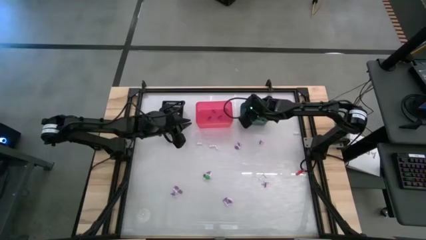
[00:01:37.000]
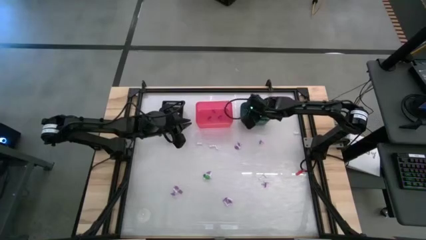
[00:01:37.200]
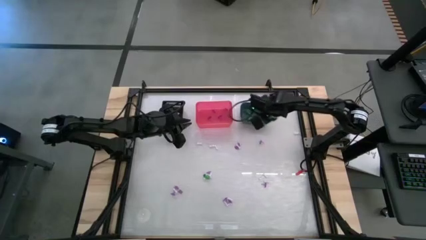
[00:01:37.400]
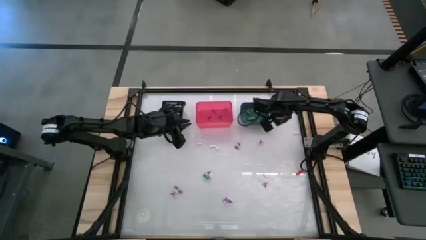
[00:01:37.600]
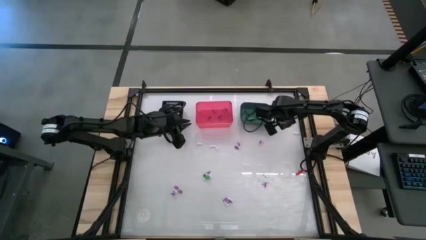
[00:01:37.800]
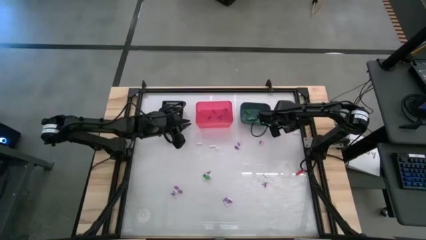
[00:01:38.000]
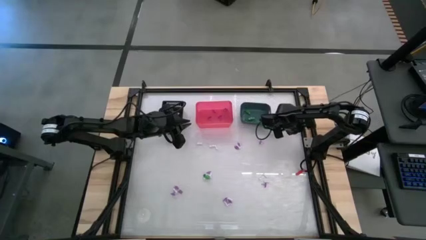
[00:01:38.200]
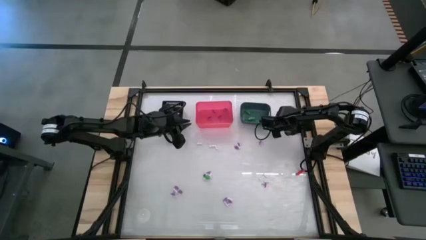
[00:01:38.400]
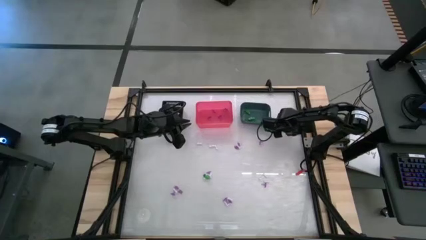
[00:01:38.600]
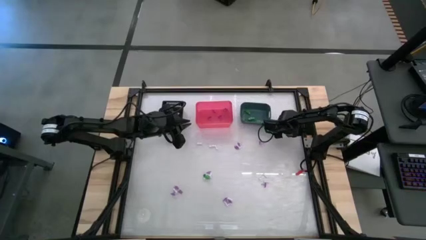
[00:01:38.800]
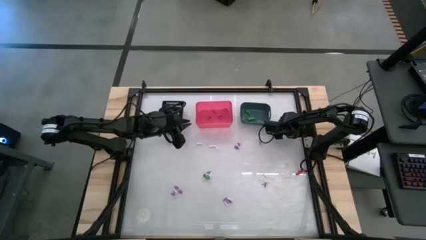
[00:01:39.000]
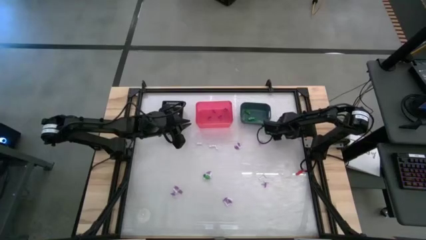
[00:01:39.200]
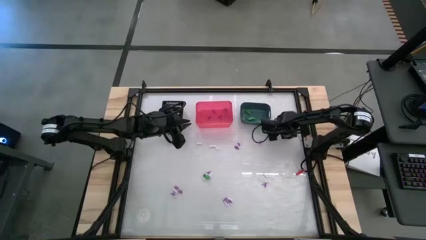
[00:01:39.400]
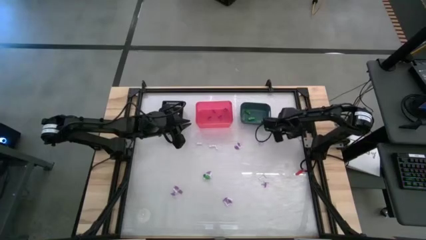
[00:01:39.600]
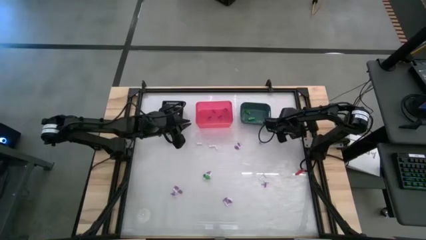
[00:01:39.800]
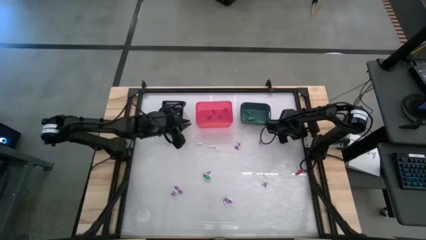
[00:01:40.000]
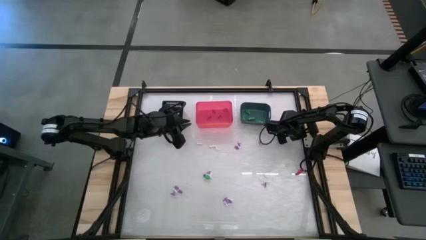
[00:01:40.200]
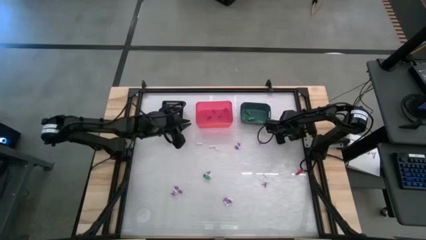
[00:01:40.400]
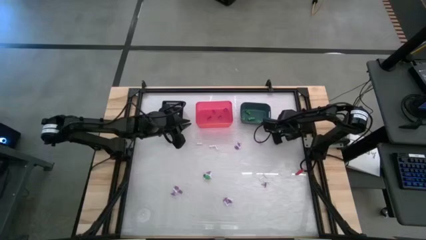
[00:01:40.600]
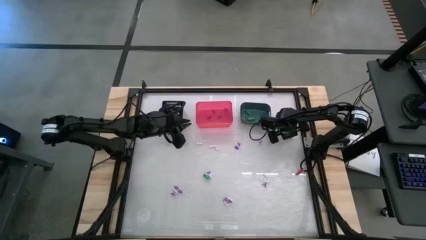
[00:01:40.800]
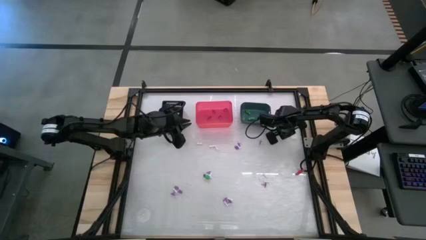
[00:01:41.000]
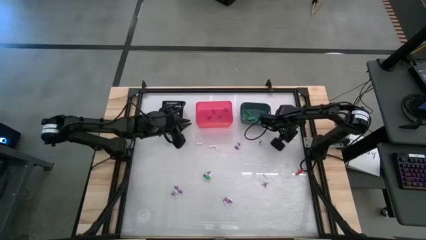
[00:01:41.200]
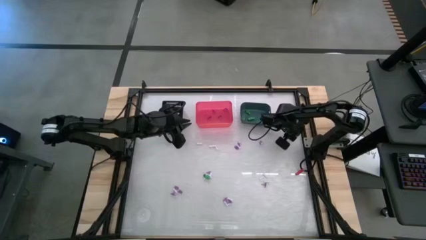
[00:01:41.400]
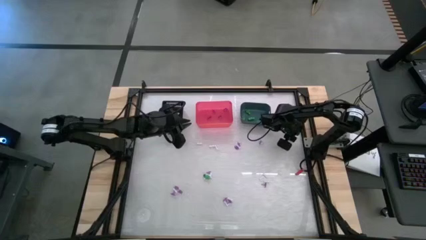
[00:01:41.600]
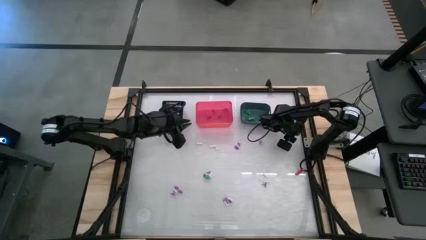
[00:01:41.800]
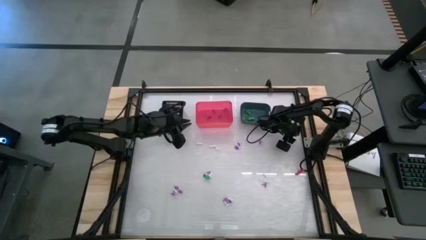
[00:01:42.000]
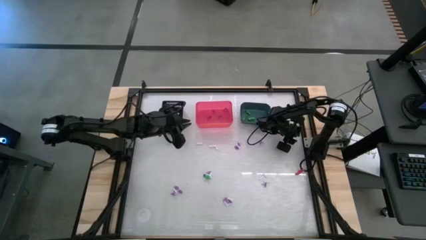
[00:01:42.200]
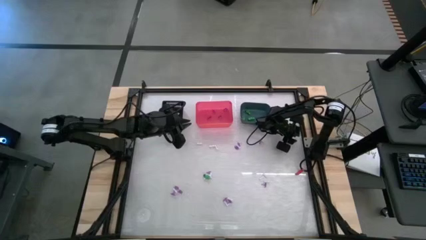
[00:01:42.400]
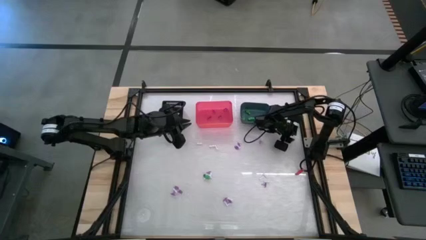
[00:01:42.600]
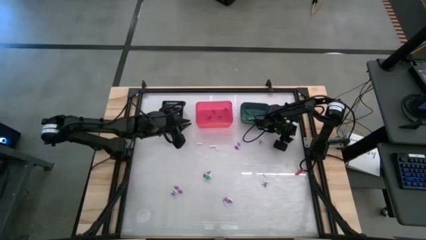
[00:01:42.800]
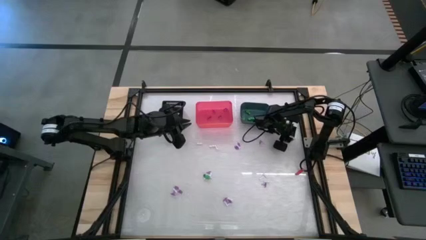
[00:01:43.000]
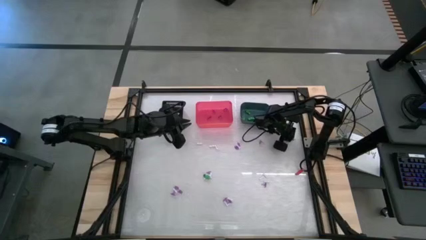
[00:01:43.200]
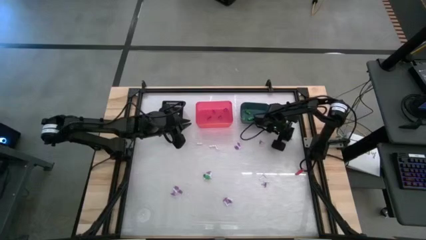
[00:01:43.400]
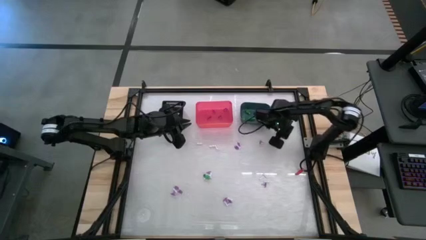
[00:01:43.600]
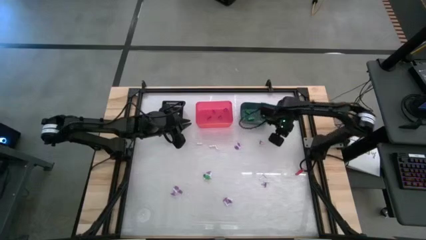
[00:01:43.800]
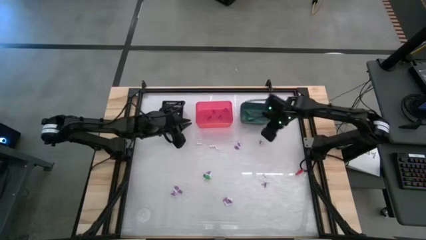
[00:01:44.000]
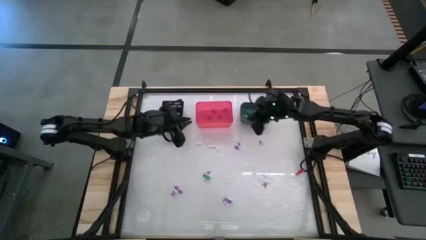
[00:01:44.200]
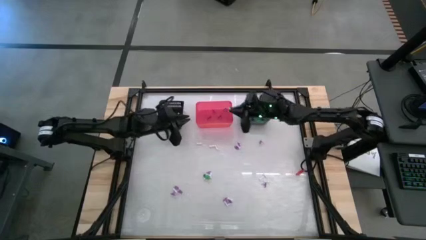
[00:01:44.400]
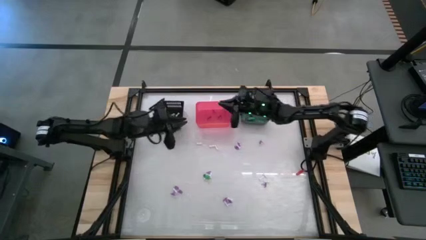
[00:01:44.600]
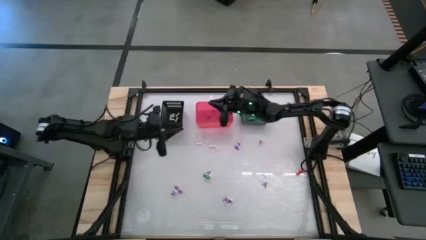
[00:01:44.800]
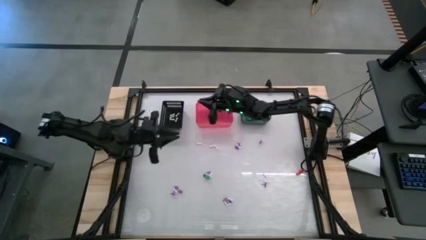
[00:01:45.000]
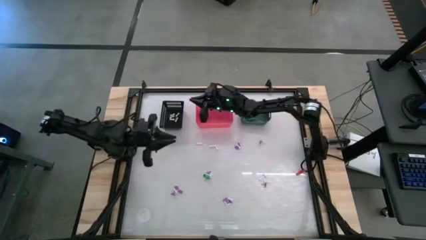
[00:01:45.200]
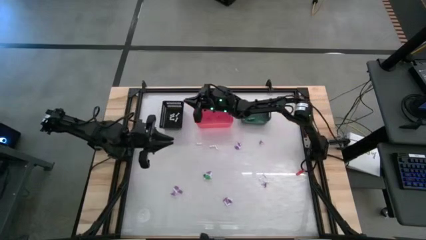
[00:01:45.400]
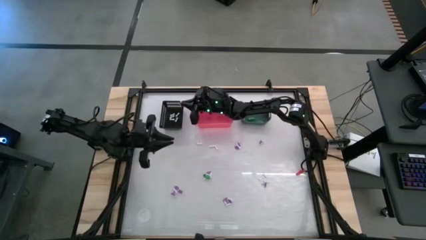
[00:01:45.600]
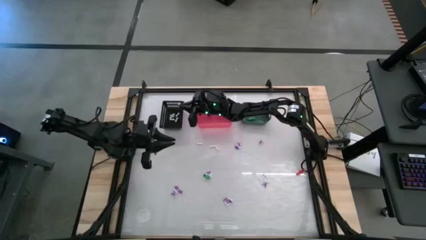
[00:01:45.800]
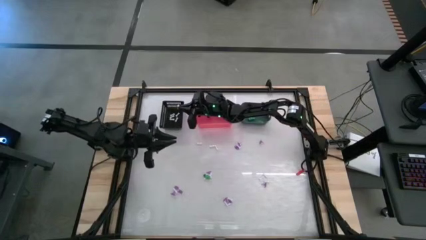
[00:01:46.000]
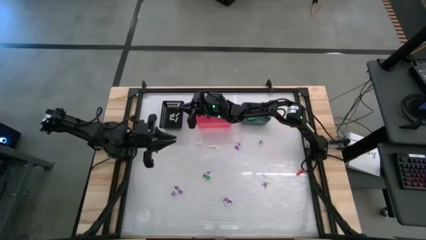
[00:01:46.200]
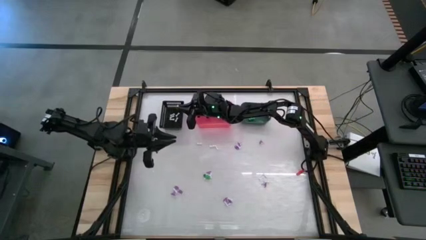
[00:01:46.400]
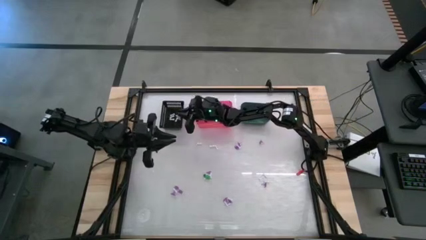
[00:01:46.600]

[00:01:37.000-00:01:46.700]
Task: Sort Halloween decoration
Put the white bone toy into the black bin

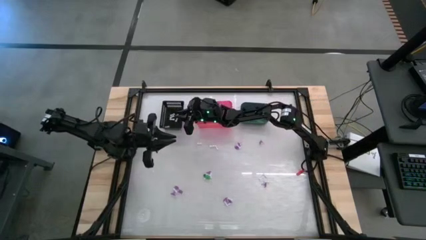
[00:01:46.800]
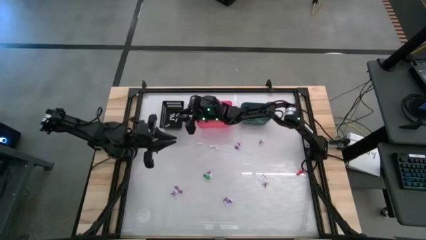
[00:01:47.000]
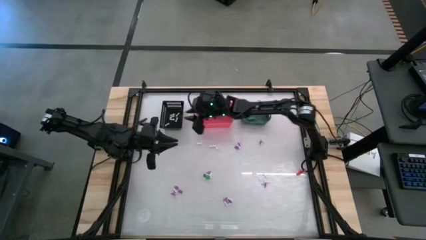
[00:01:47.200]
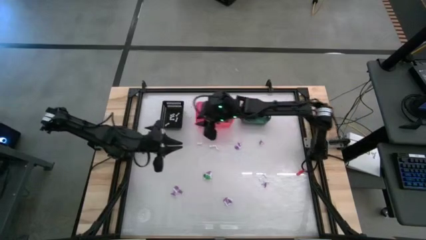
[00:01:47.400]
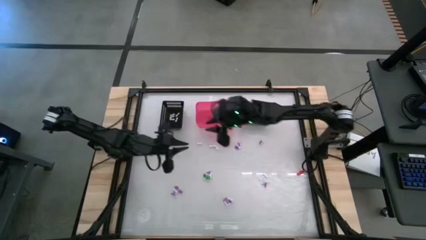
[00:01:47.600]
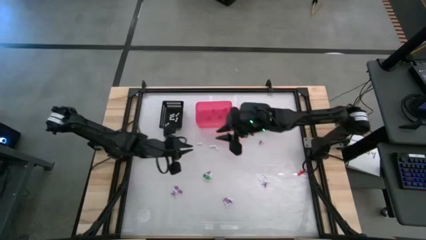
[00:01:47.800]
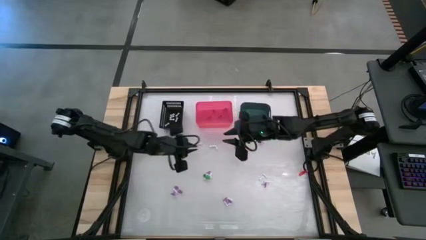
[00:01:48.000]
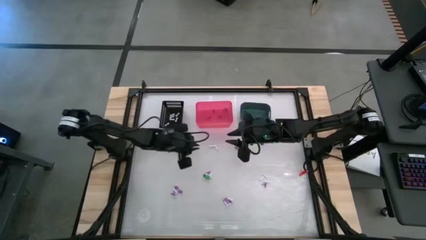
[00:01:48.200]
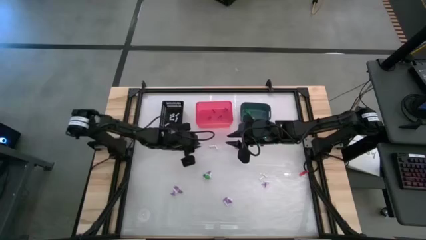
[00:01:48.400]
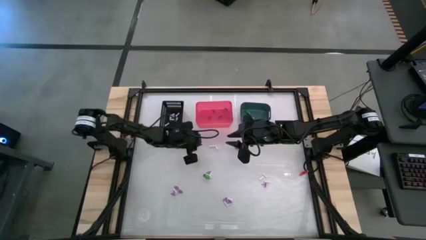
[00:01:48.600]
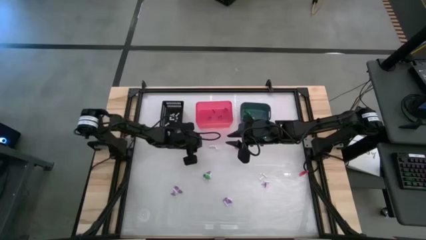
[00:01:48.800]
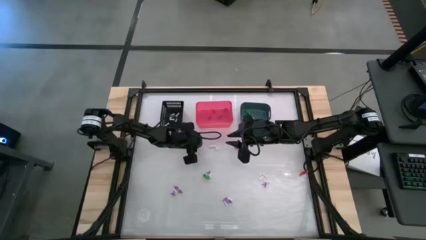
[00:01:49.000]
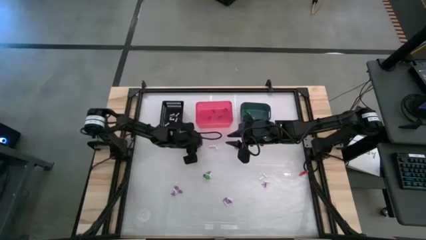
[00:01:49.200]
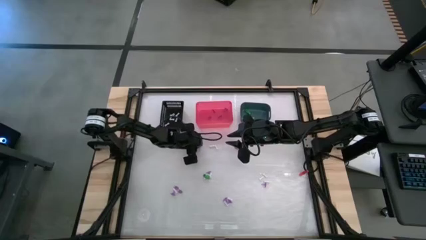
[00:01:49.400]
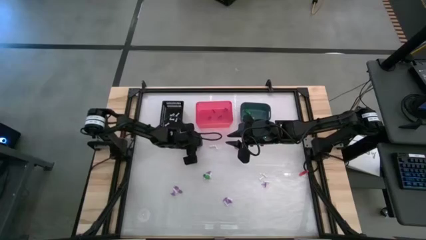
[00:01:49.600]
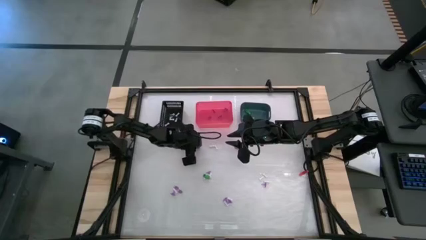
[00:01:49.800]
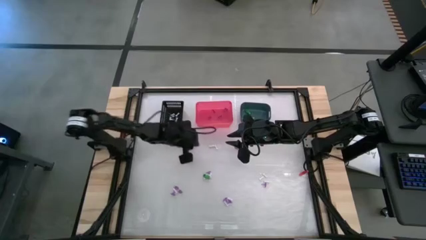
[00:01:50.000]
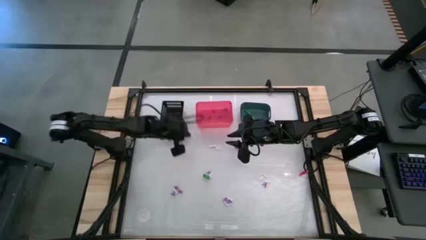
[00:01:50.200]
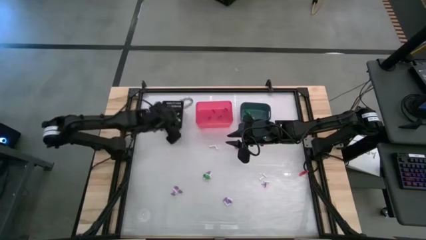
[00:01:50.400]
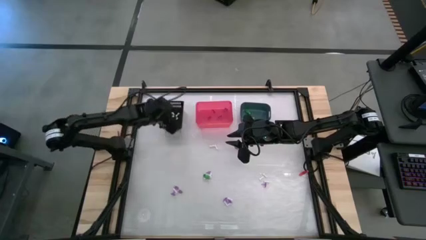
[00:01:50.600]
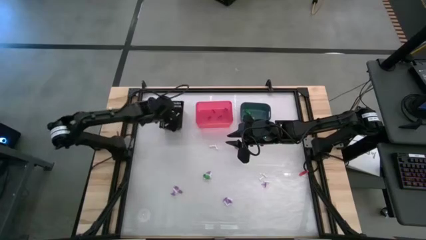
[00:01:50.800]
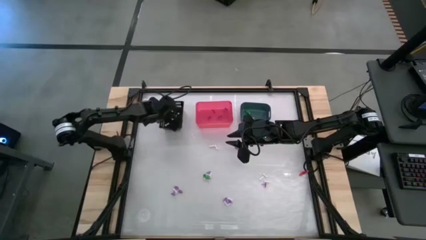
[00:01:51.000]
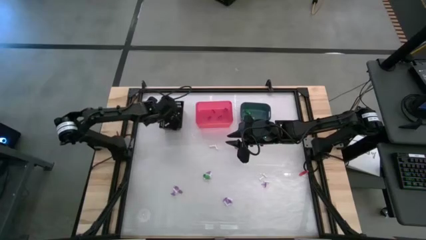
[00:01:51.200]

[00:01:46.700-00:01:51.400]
Put the white bone toy into the black bin

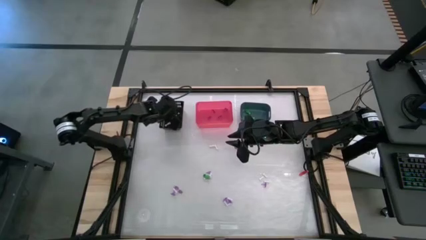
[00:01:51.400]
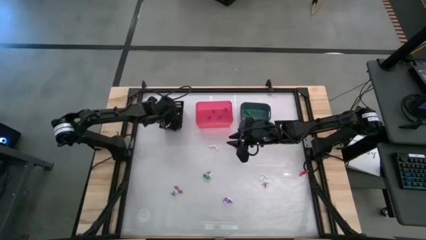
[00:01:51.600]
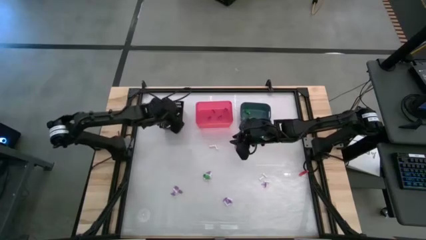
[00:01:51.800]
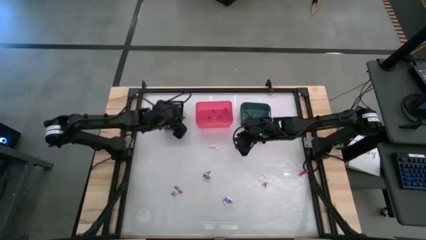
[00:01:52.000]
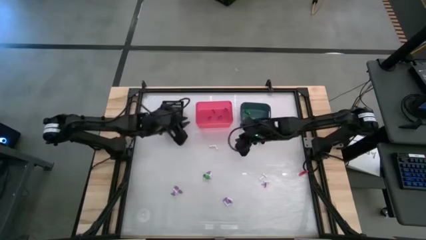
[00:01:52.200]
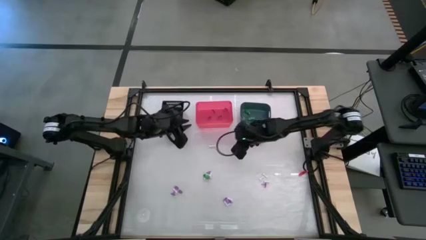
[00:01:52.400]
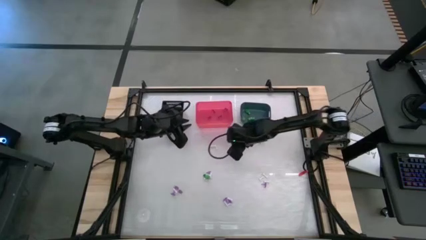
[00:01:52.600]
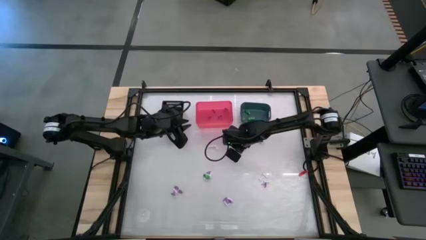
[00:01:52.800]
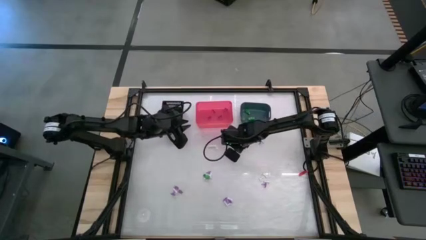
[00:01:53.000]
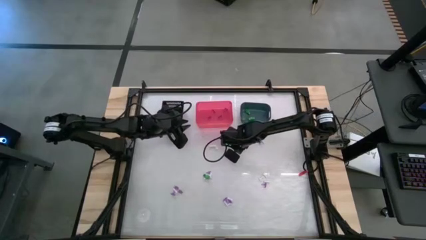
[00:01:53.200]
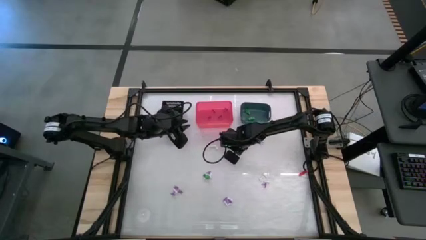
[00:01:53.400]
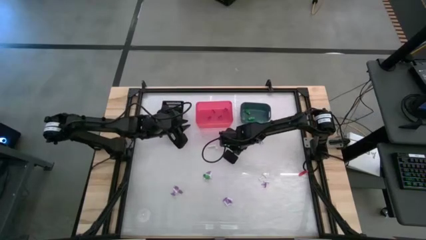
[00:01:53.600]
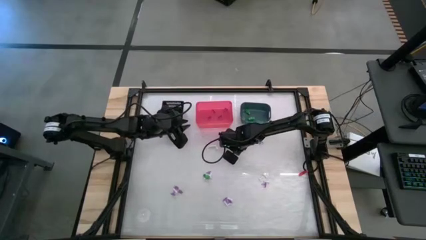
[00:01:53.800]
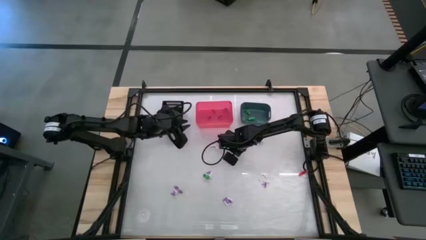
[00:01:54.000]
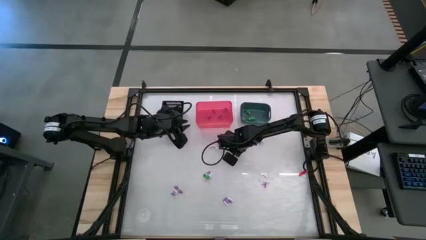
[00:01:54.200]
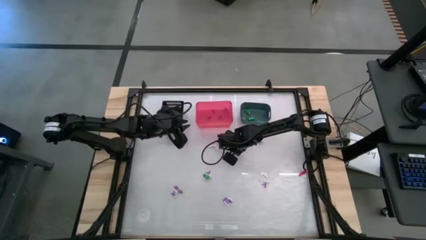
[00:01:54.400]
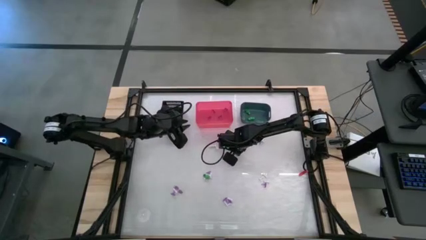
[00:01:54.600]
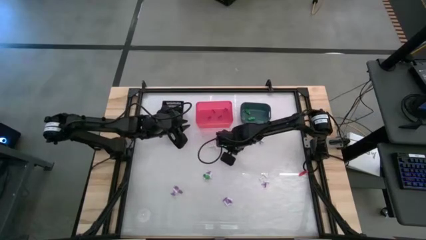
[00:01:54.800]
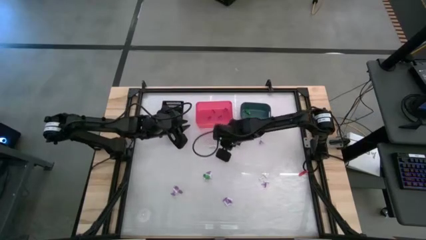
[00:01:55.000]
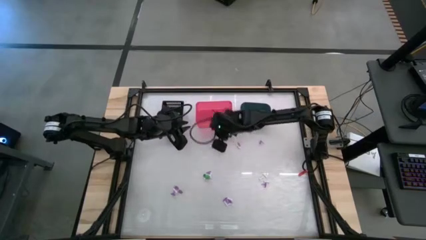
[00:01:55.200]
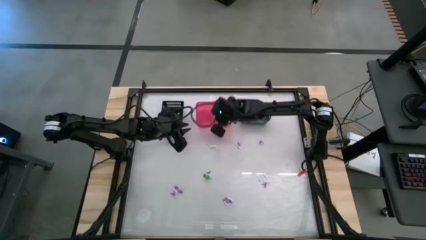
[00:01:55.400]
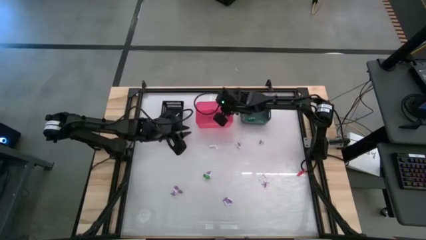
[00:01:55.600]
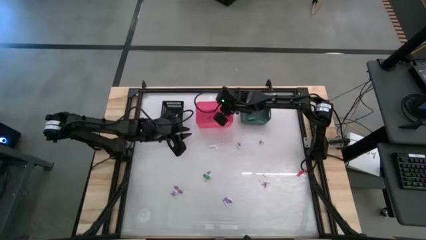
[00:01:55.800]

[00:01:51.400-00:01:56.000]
Put the purple hat toy into the pink bin
